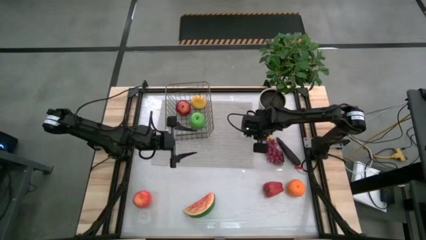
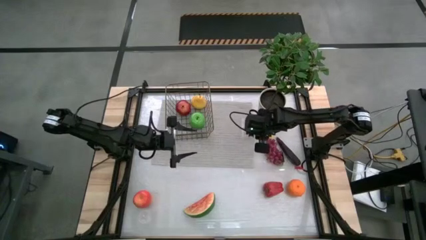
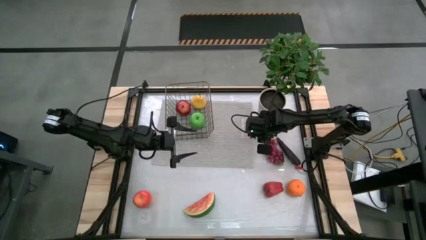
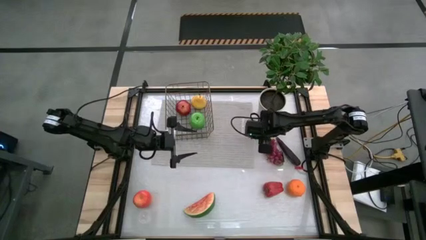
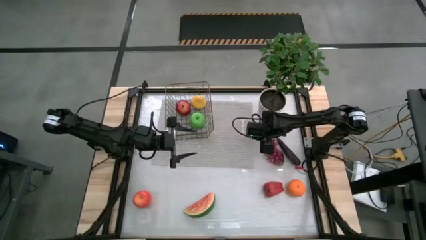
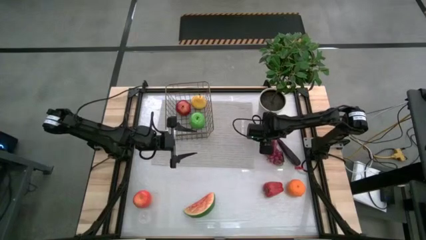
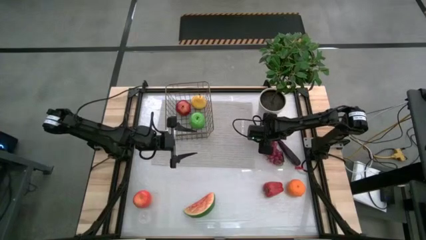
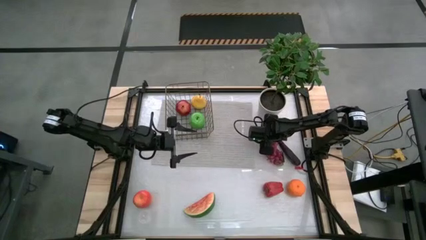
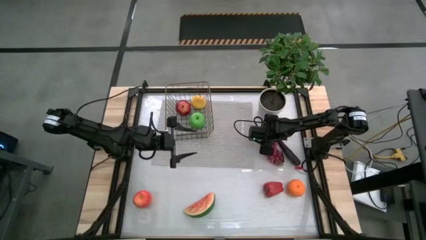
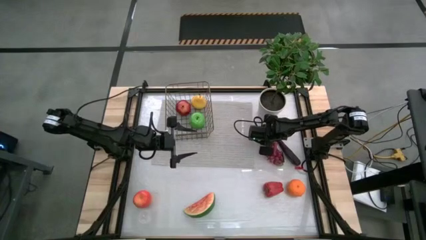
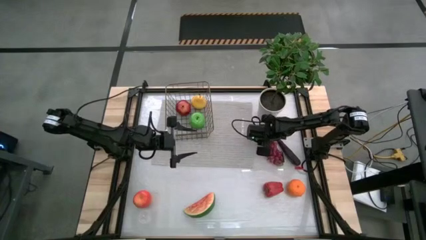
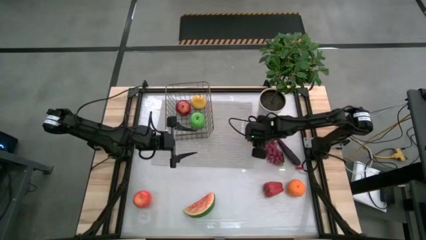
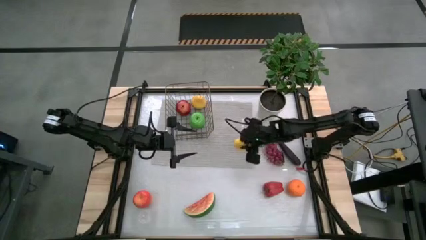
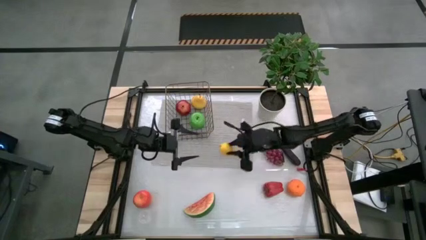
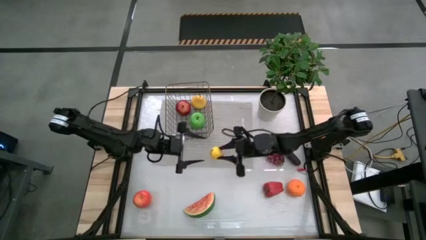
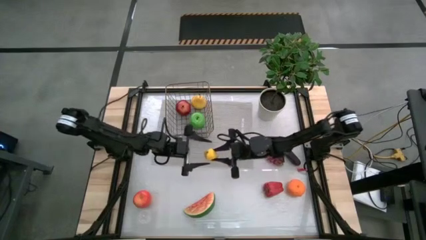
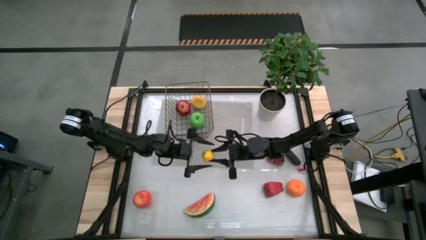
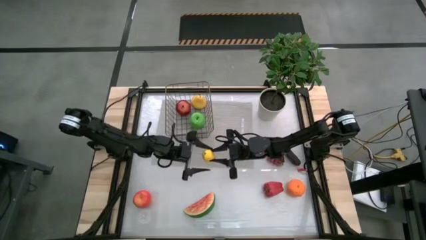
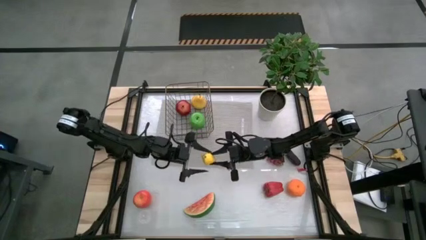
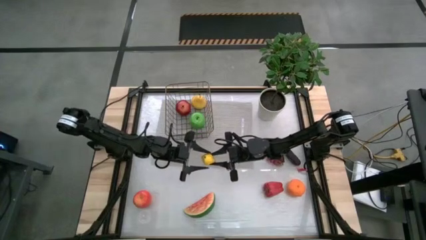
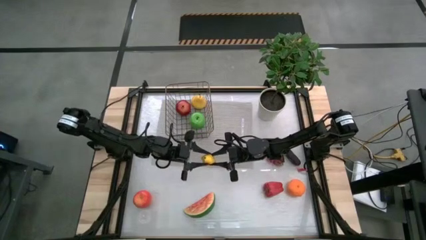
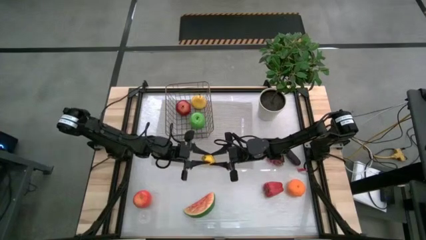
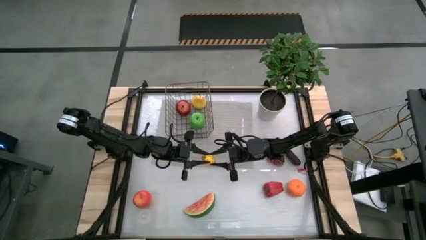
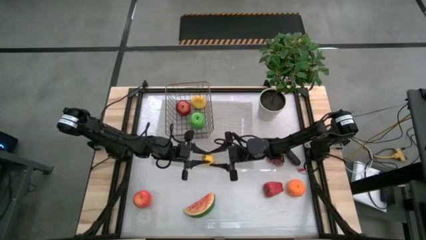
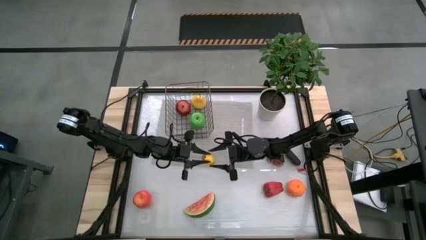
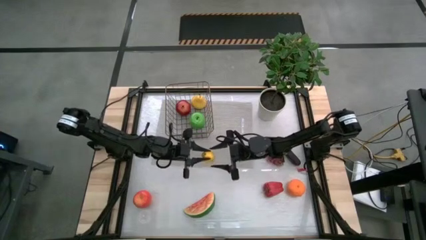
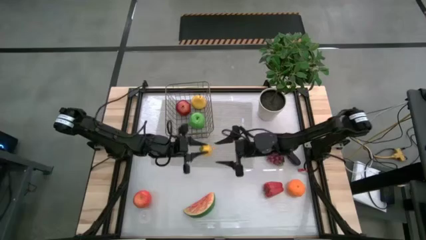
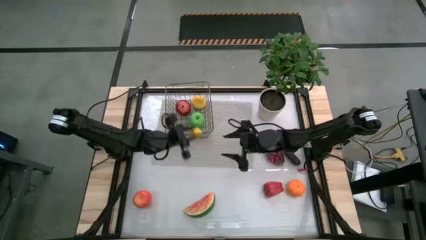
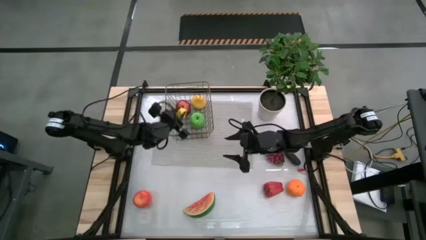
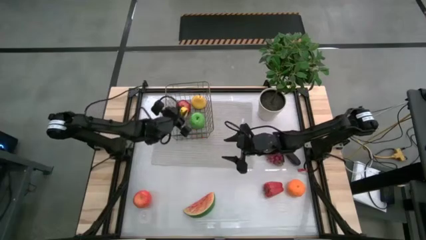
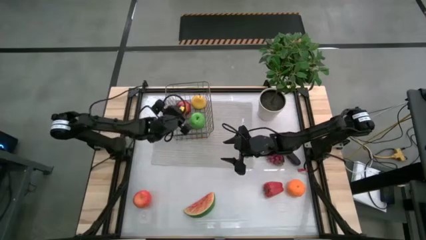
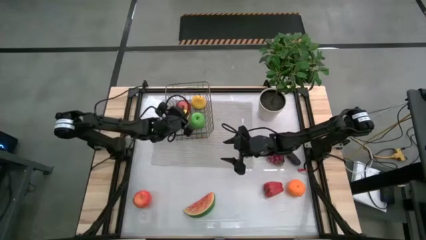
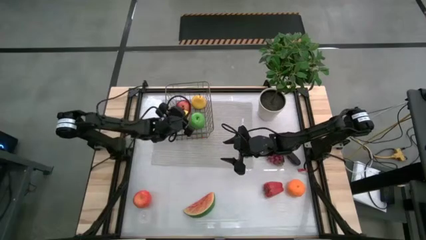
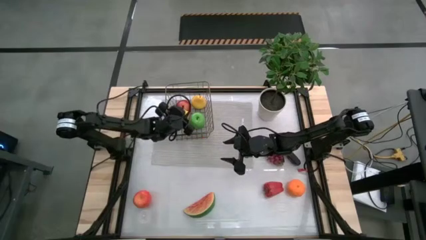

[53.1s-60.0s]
Task: Build produce basket
Put the yellow lemon into the brown wire basket
